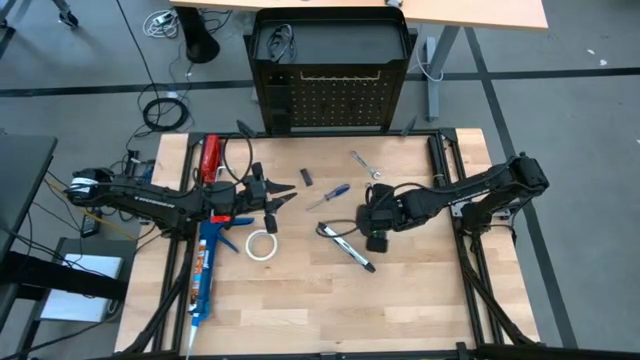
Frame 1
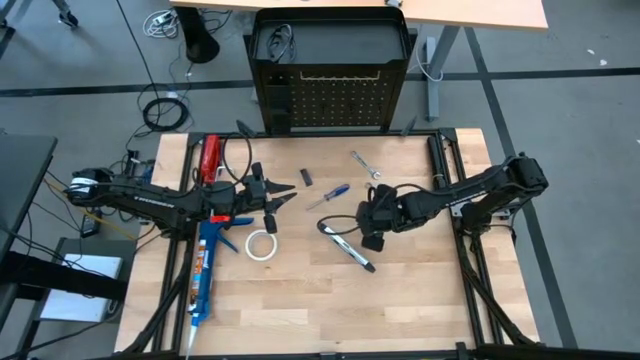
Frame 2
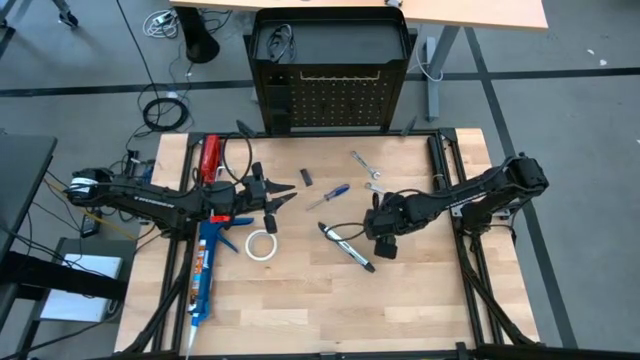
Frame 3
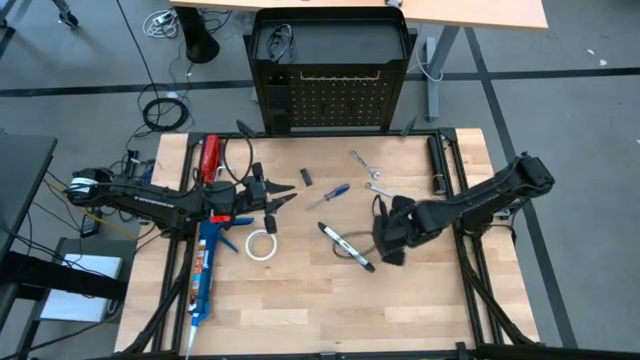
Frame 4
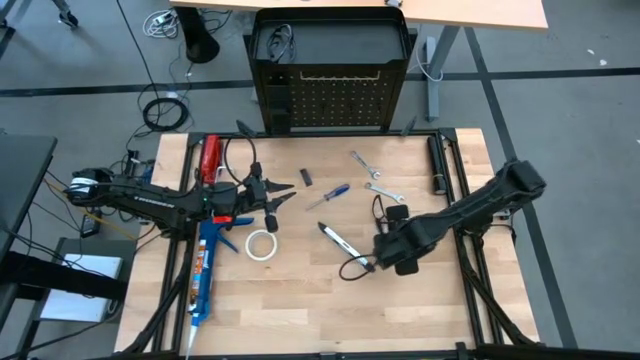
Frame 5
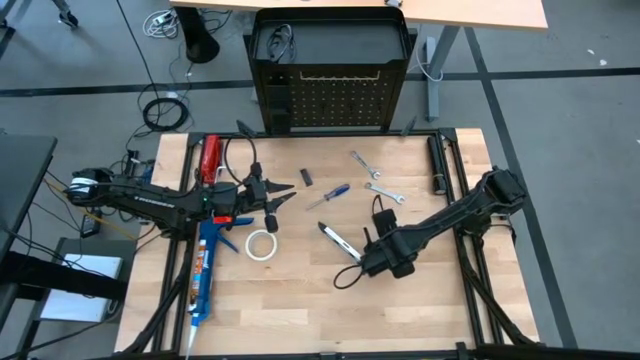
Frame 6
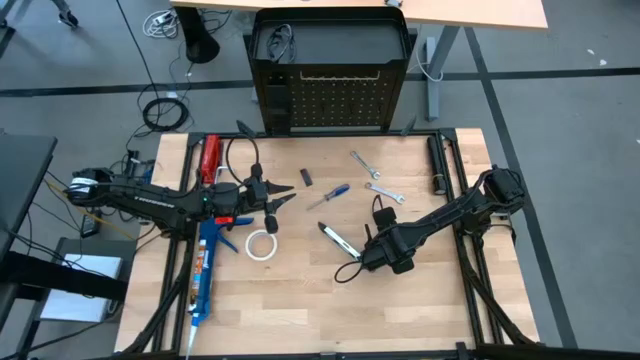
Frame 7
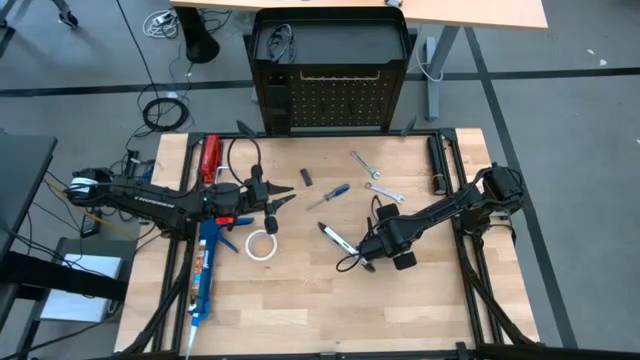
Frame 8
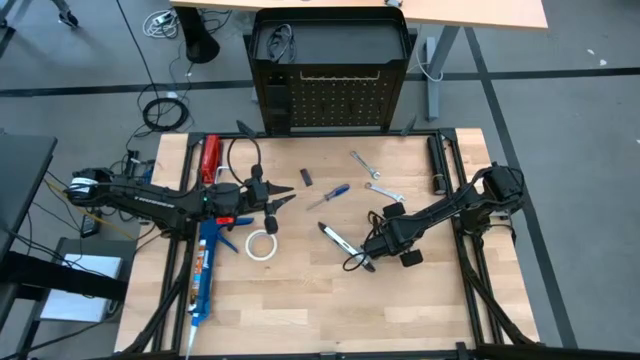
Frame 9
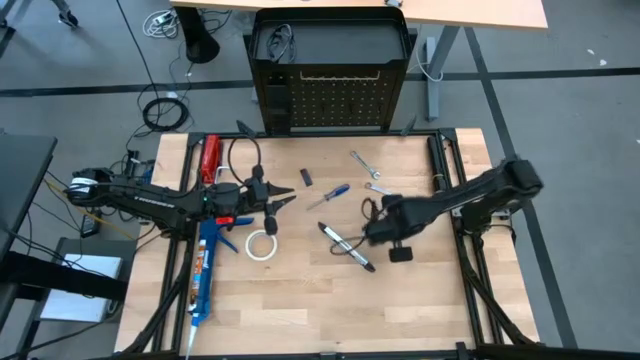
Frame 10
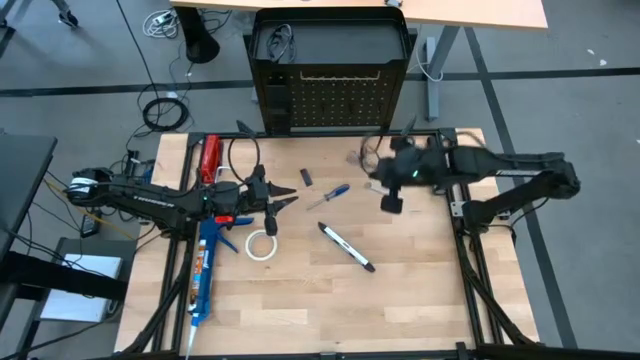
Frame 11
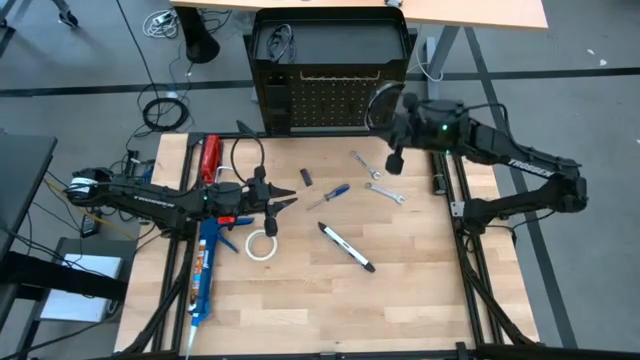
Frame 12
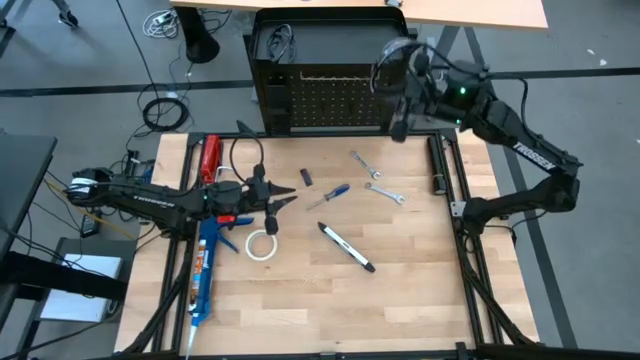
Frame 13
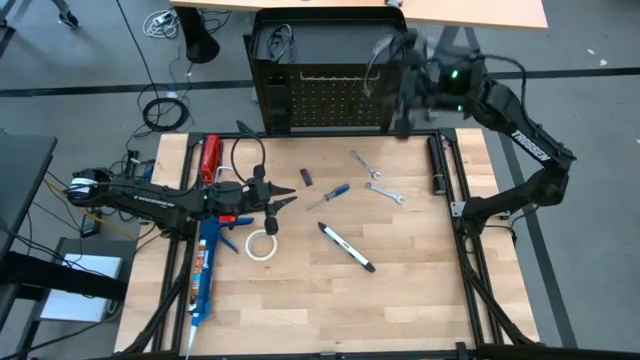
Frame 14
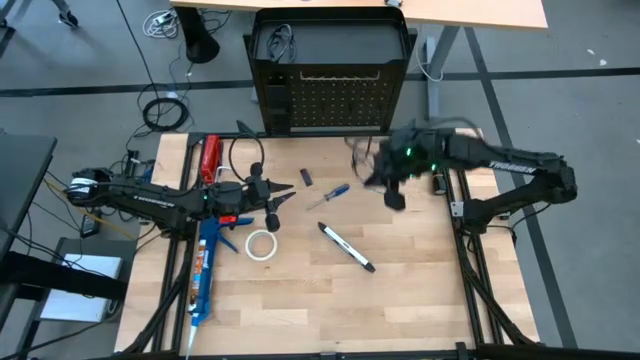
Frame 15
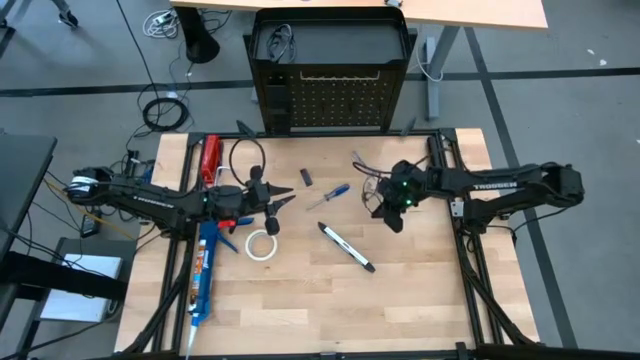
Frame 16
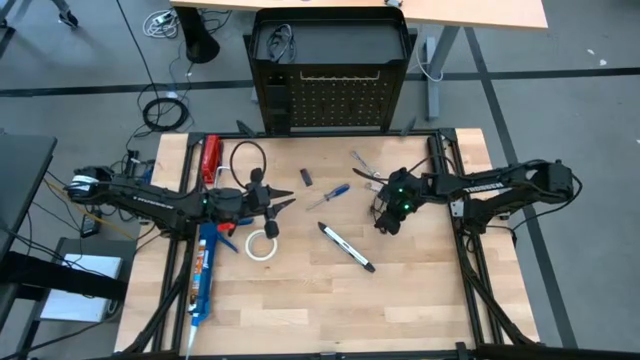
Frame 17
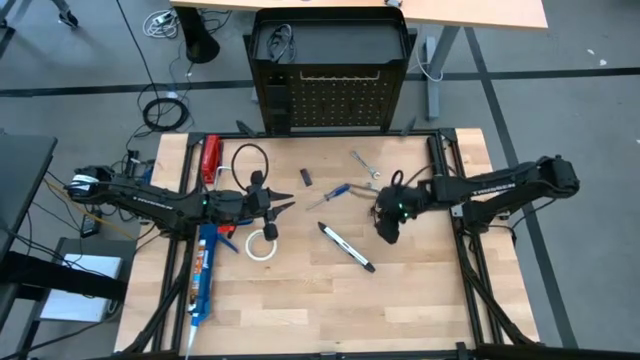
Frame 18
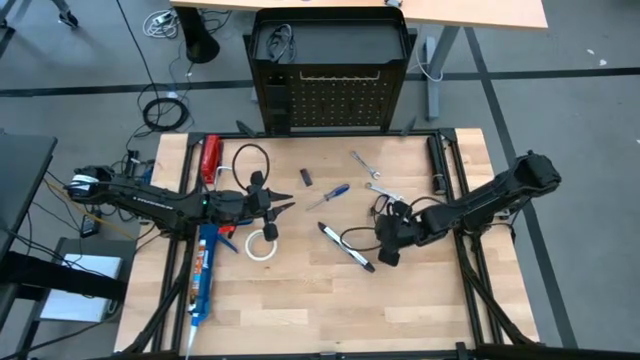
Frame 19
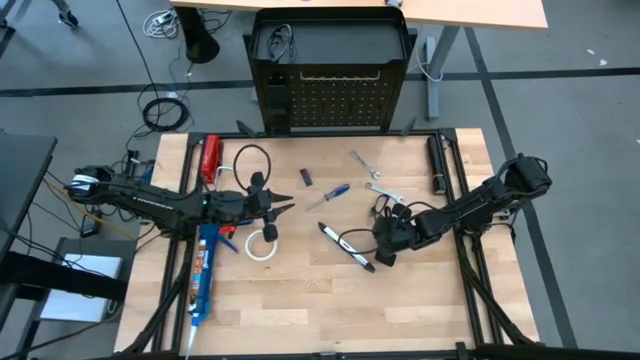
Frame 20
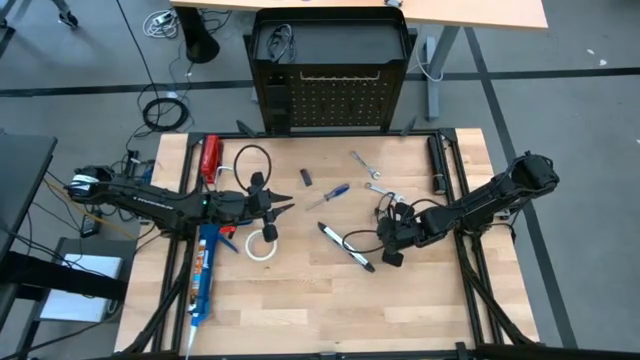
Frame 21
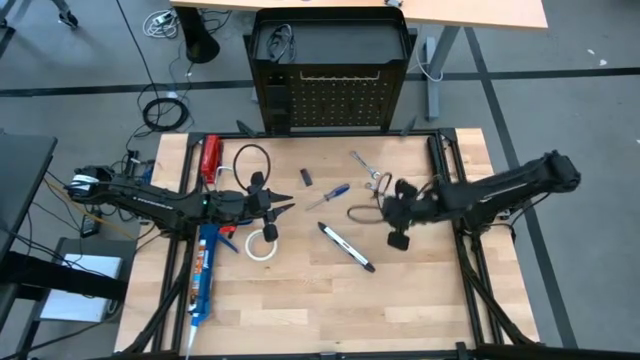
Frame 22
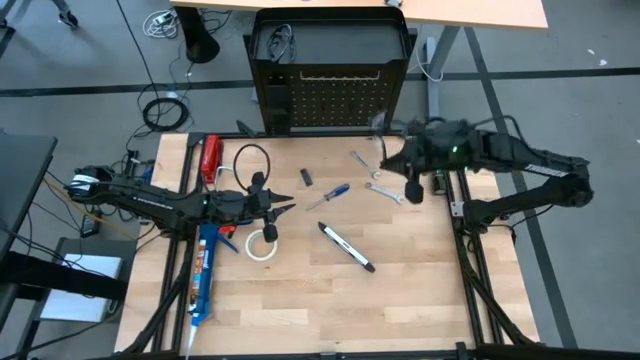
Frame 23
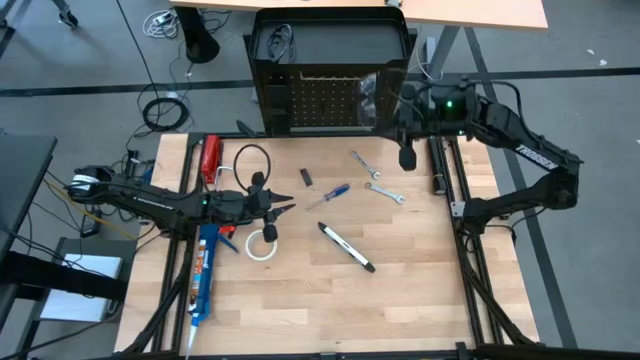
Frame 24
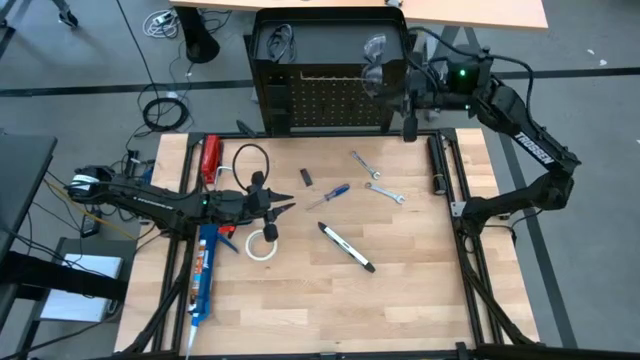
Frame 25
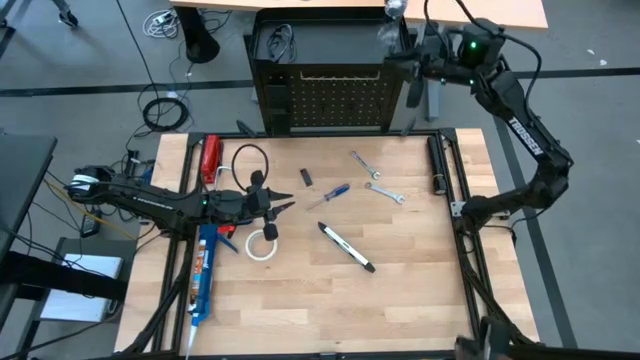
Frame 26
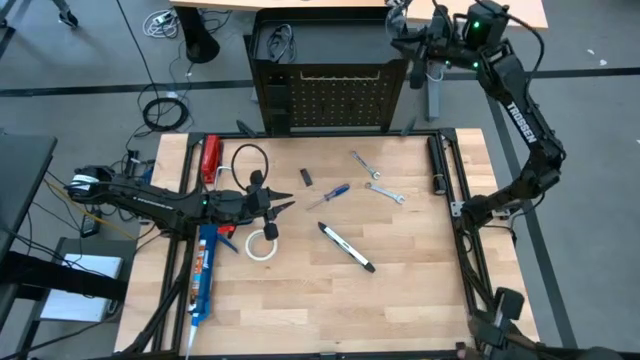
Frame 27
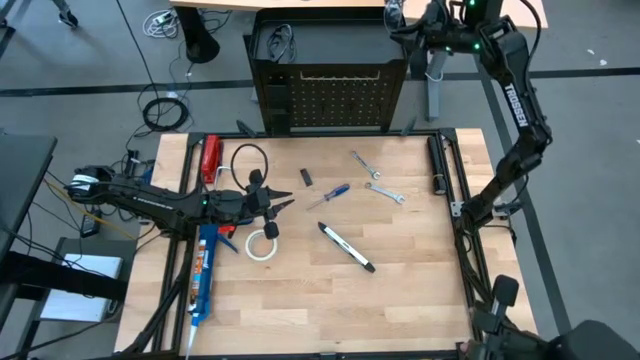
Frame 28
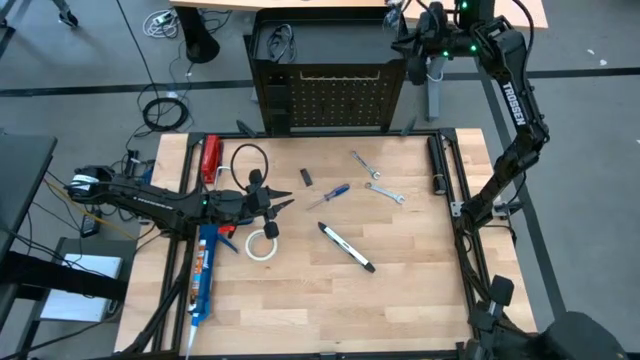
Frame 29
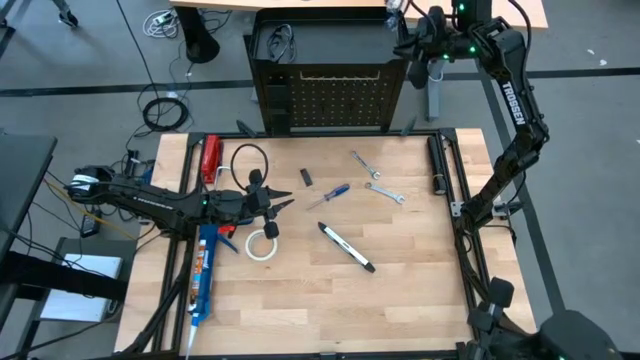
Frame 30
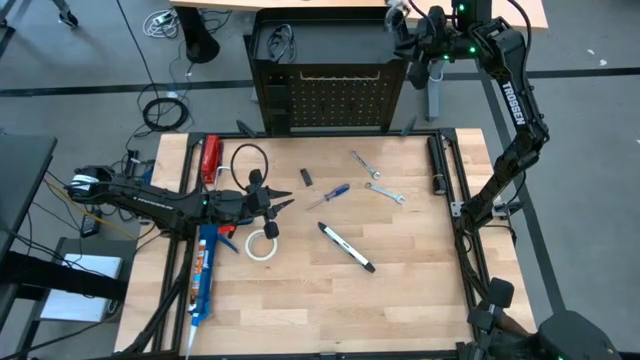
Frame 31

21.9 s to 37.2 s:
Task: Hang tools onto peg board
Put the black safety glasses on the top of the black pegboard

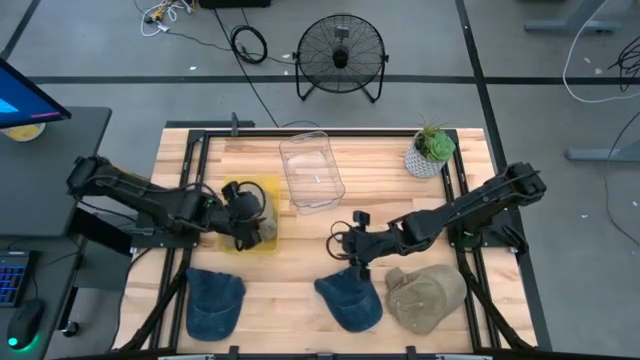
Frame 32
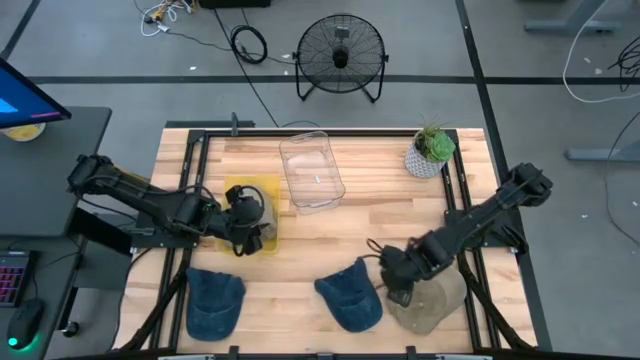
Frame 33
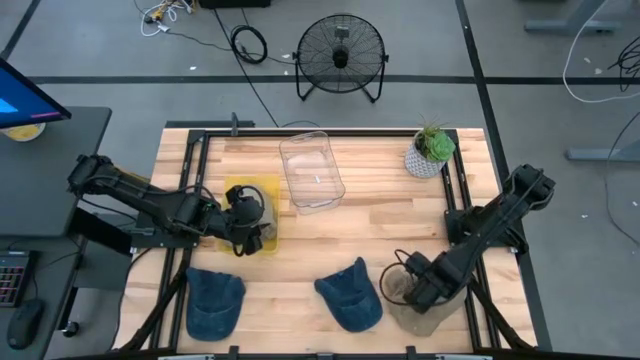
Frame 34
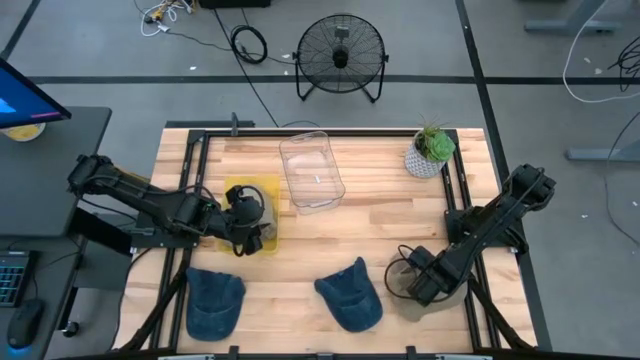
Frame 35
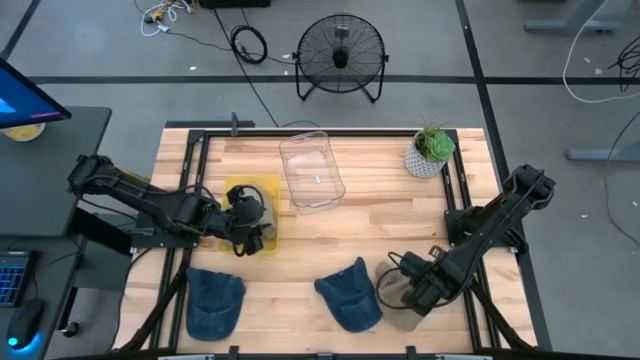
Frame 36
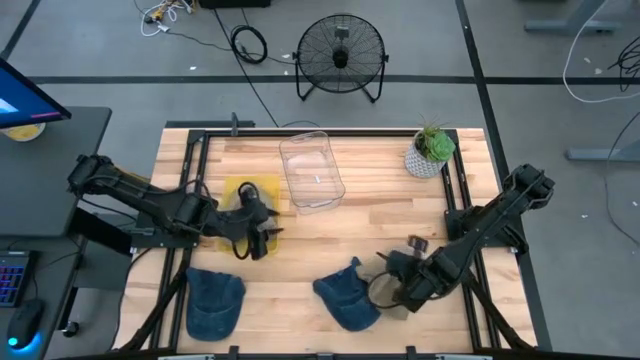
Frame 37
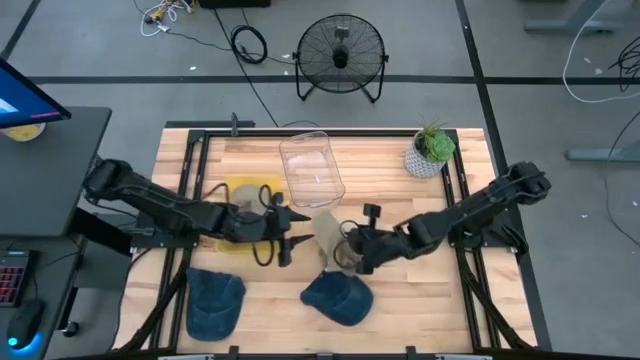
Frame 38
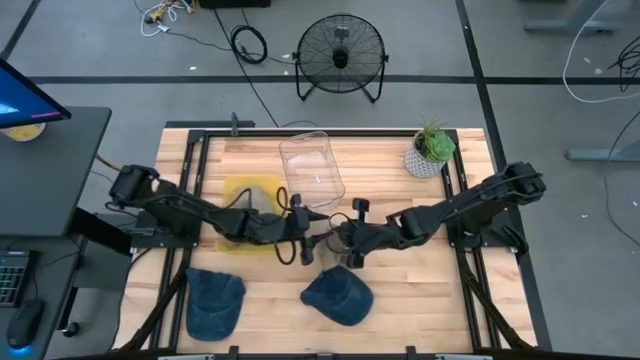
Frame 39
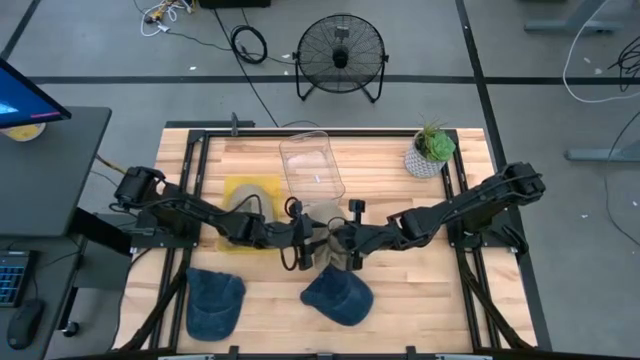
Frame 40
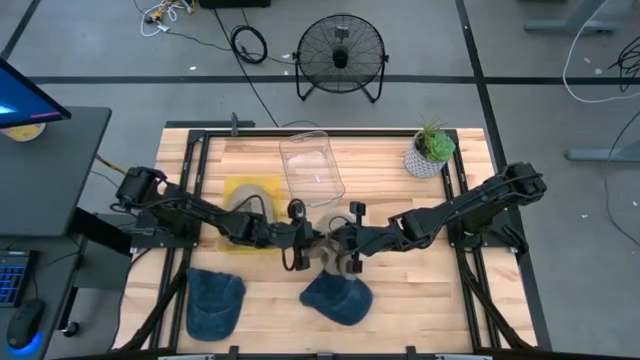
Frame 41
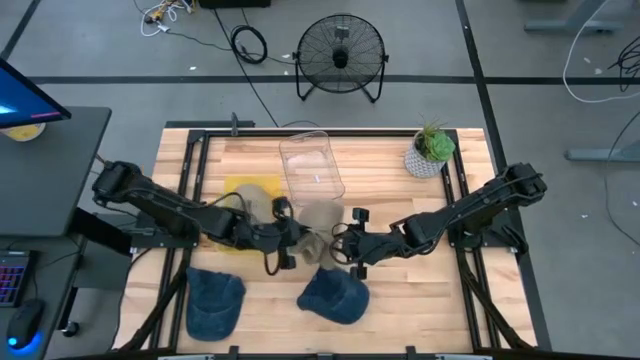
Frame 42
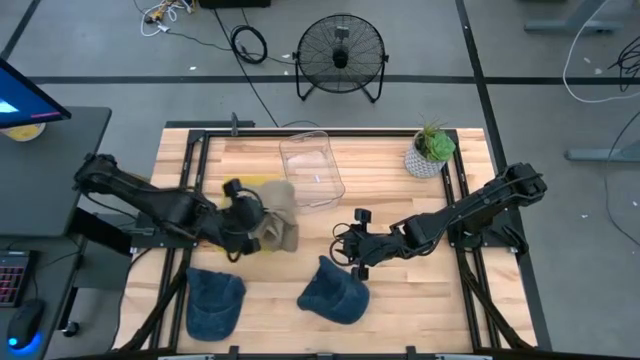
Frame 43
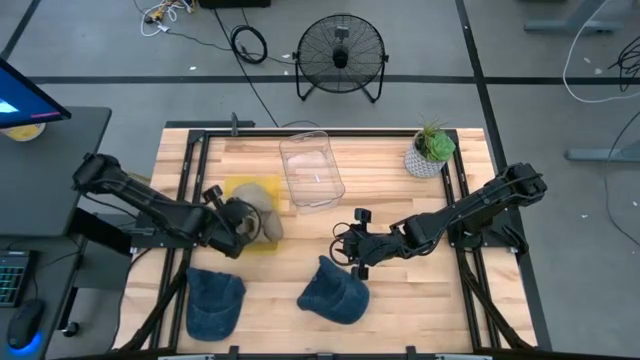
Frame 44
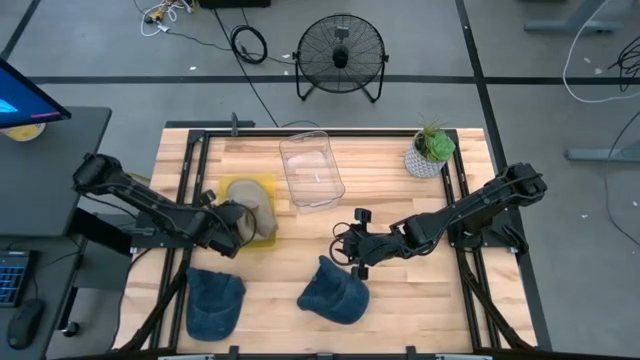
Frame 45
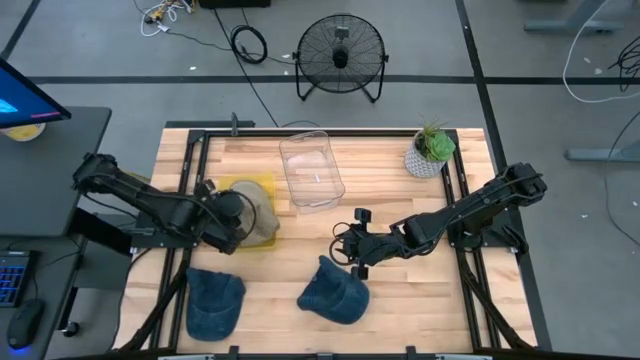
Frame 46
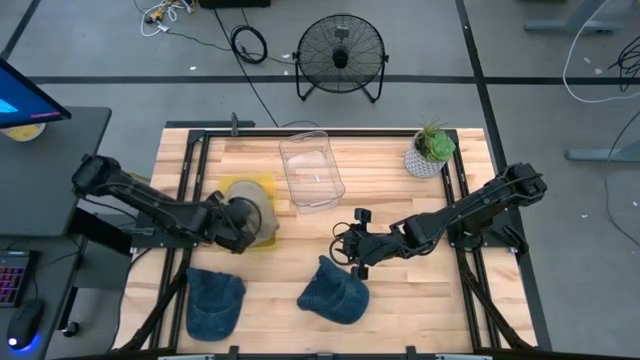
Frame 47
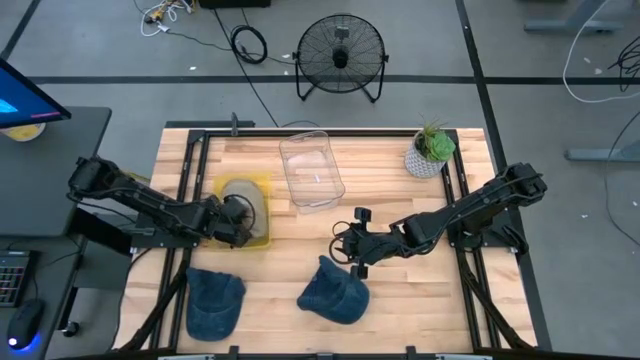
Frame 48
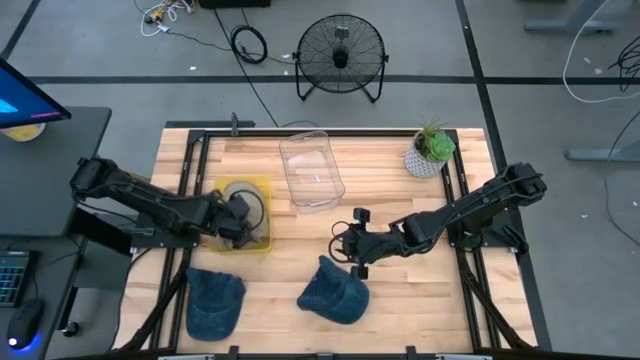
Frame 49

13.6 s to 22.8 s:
Task: Pick & Place hat
Put the brown cap into the yellow bin
